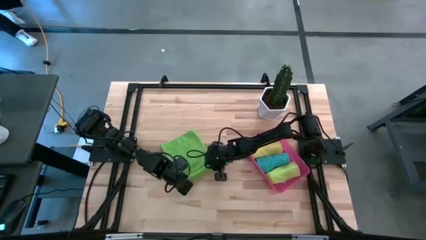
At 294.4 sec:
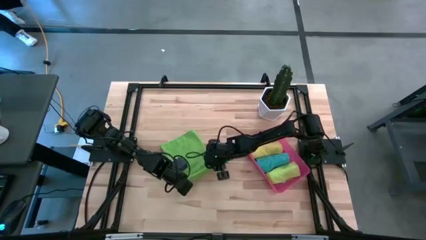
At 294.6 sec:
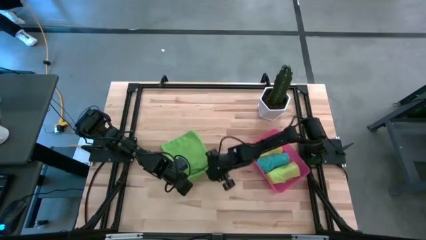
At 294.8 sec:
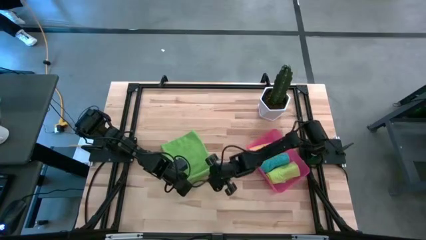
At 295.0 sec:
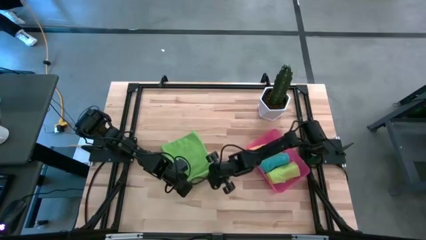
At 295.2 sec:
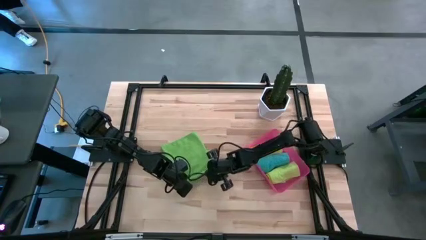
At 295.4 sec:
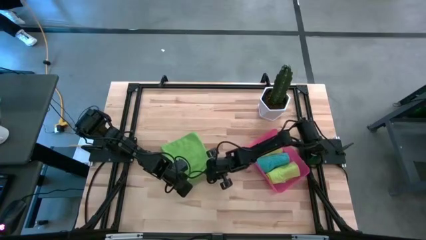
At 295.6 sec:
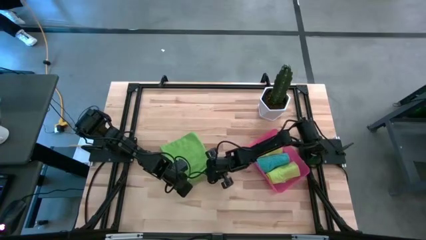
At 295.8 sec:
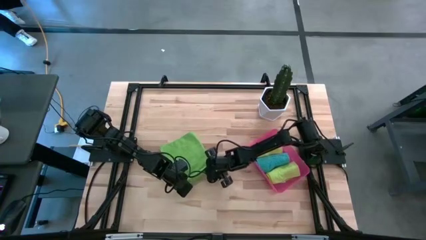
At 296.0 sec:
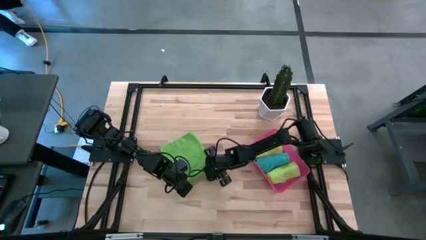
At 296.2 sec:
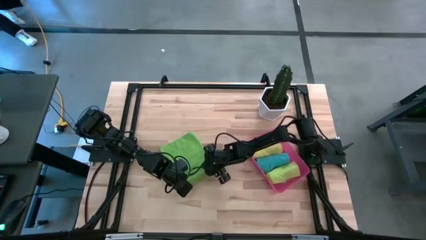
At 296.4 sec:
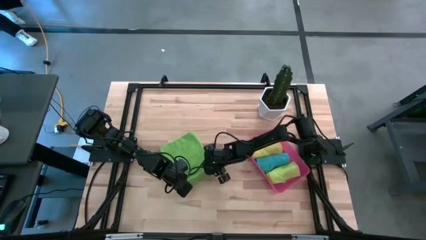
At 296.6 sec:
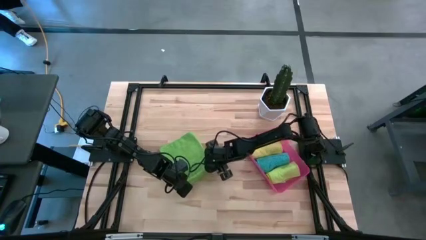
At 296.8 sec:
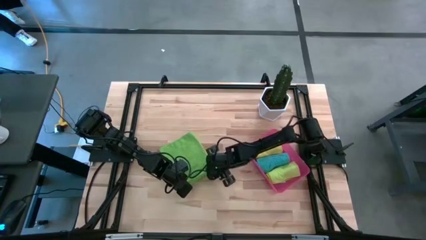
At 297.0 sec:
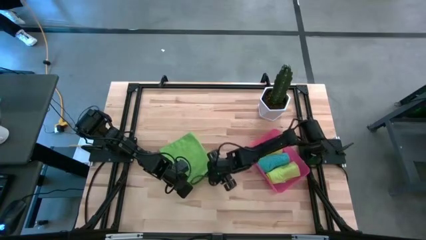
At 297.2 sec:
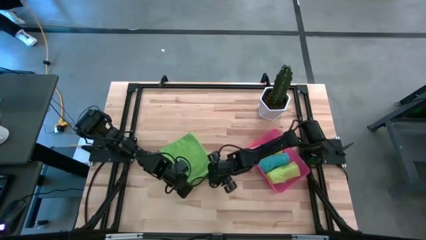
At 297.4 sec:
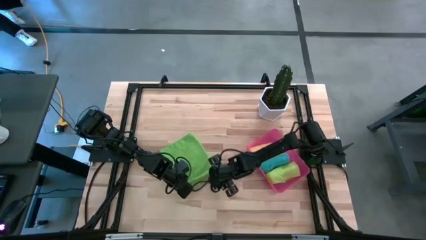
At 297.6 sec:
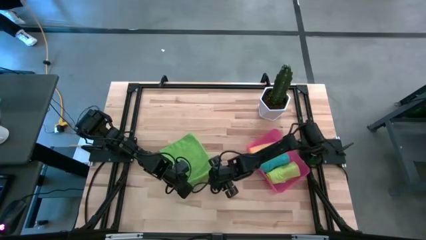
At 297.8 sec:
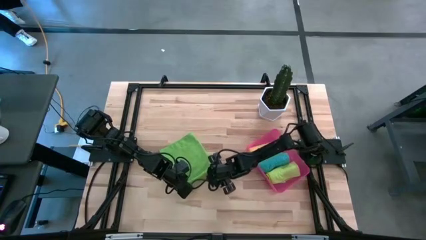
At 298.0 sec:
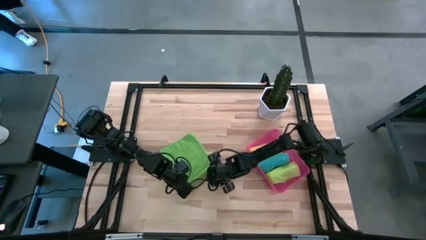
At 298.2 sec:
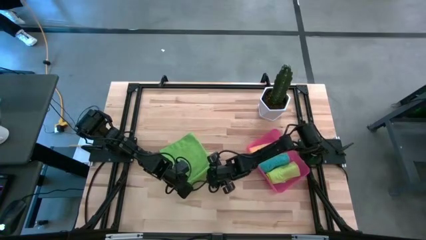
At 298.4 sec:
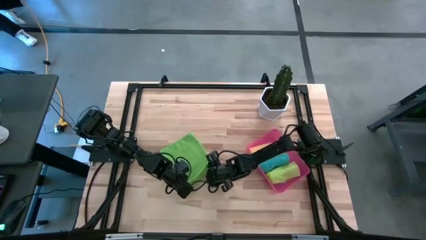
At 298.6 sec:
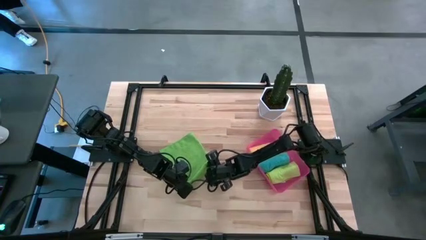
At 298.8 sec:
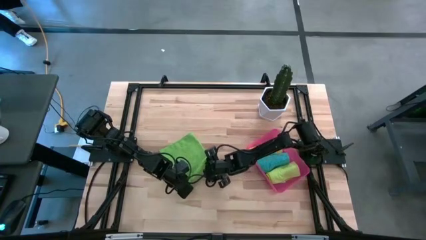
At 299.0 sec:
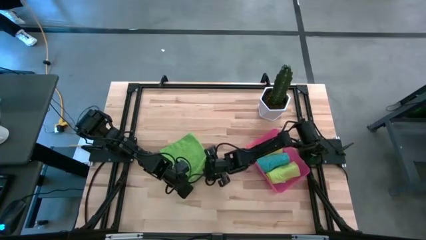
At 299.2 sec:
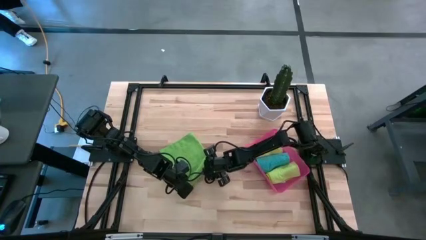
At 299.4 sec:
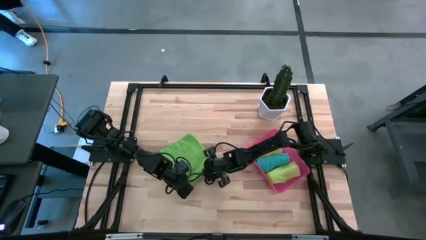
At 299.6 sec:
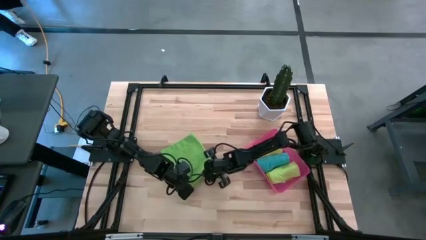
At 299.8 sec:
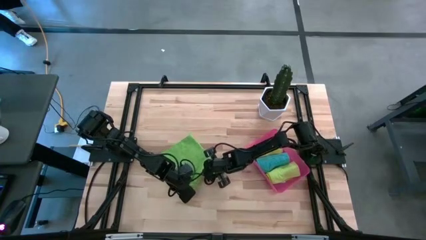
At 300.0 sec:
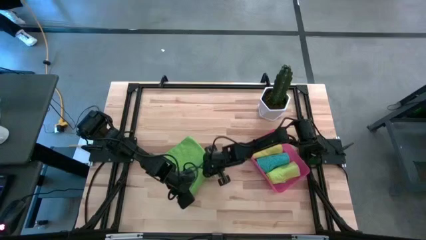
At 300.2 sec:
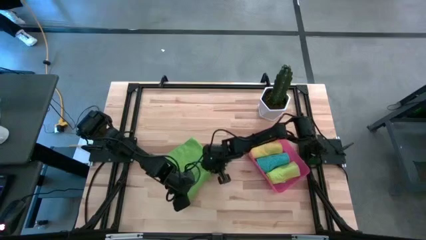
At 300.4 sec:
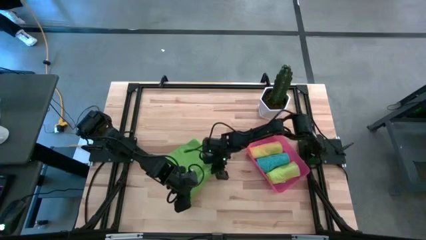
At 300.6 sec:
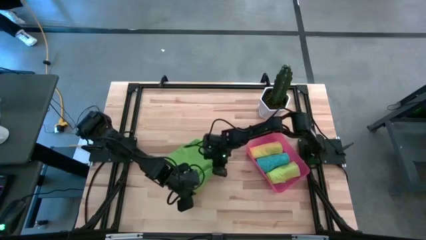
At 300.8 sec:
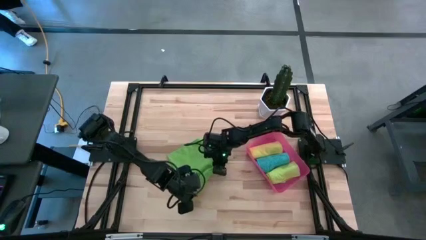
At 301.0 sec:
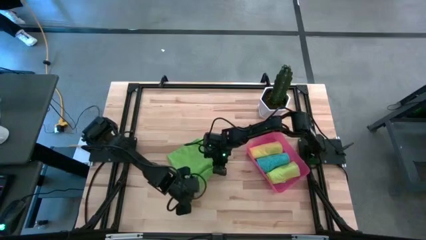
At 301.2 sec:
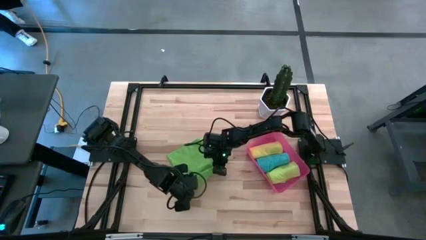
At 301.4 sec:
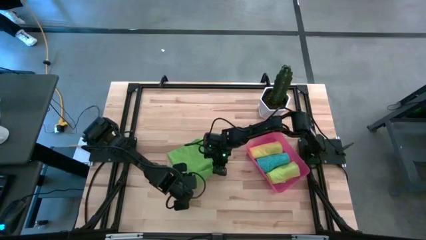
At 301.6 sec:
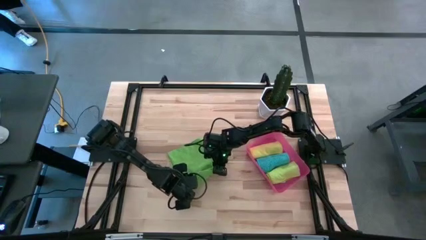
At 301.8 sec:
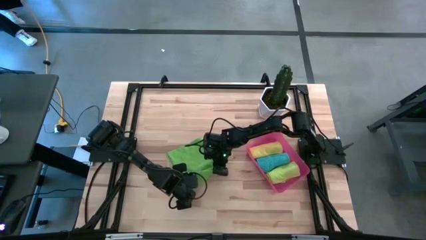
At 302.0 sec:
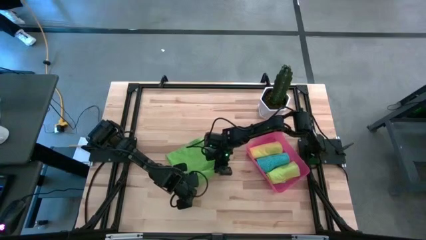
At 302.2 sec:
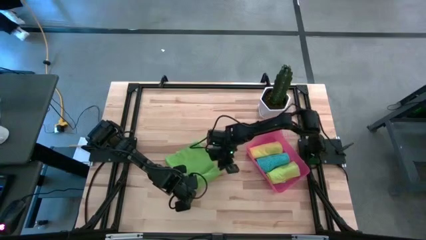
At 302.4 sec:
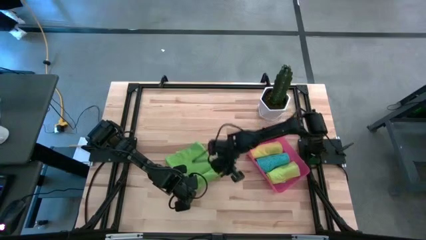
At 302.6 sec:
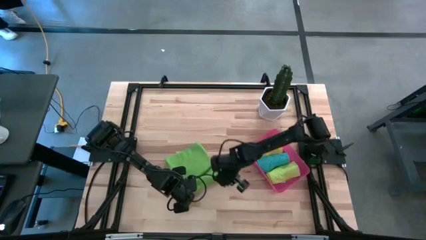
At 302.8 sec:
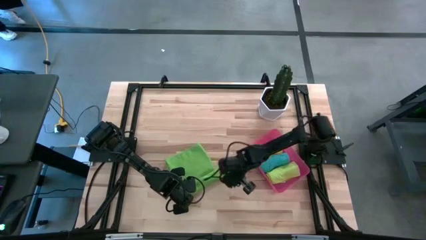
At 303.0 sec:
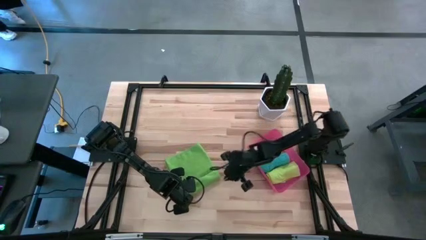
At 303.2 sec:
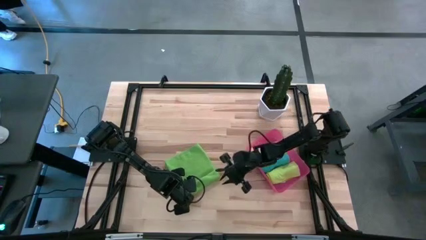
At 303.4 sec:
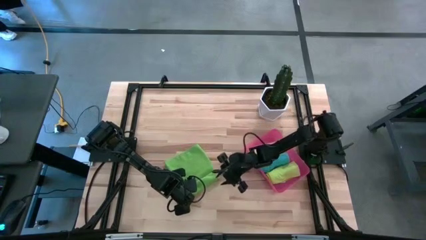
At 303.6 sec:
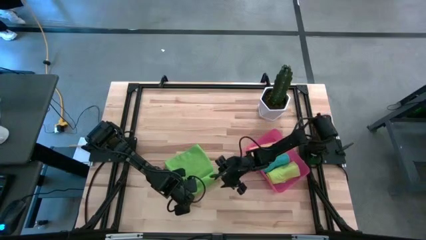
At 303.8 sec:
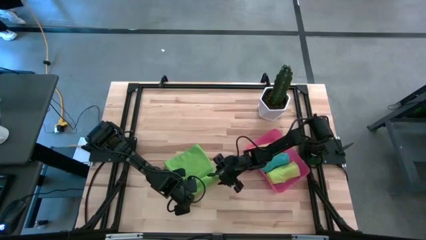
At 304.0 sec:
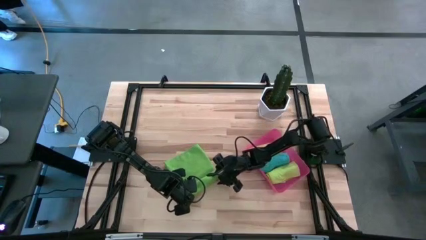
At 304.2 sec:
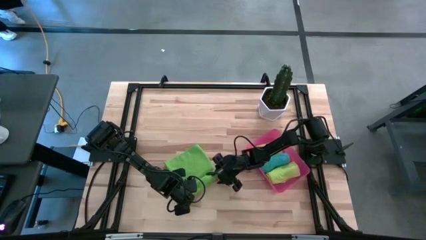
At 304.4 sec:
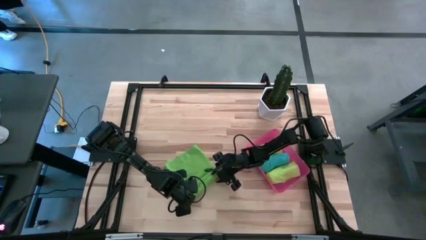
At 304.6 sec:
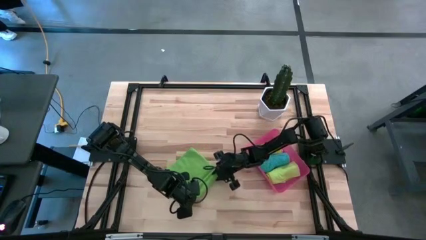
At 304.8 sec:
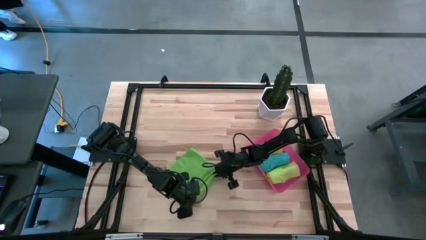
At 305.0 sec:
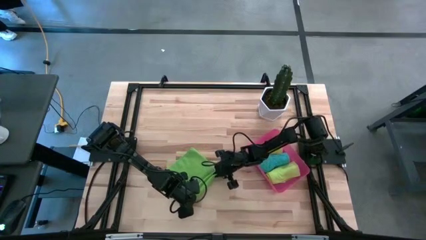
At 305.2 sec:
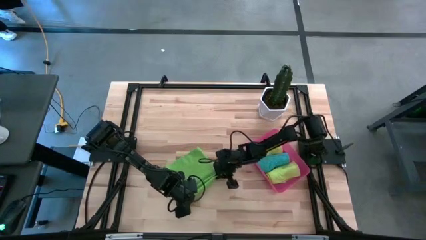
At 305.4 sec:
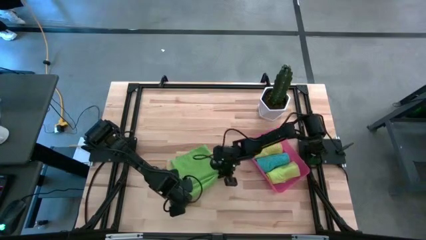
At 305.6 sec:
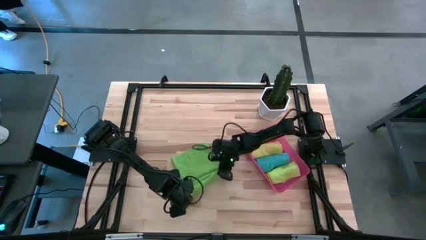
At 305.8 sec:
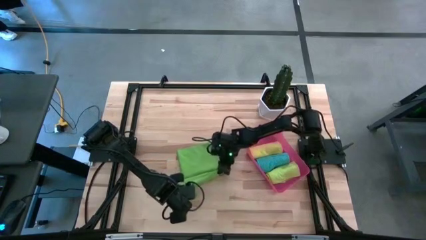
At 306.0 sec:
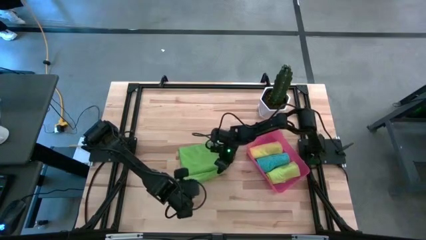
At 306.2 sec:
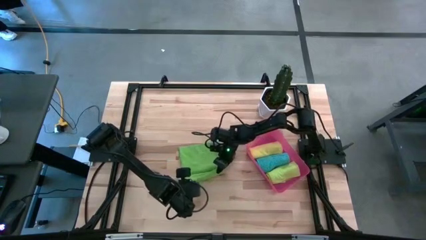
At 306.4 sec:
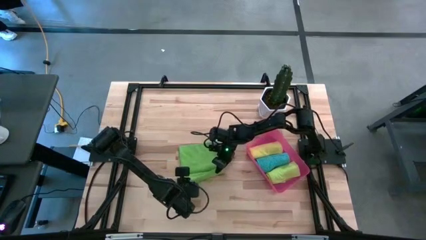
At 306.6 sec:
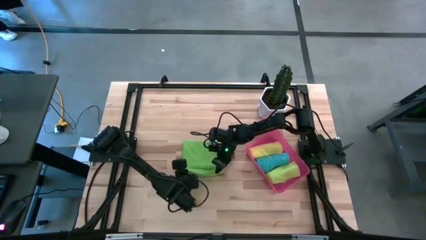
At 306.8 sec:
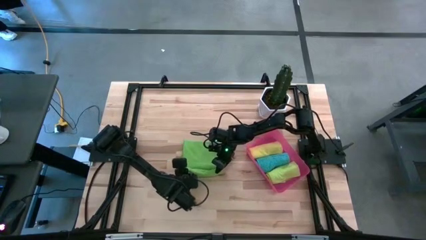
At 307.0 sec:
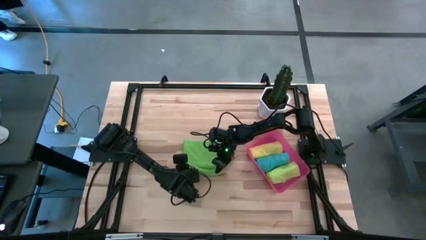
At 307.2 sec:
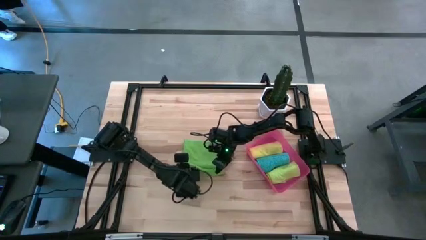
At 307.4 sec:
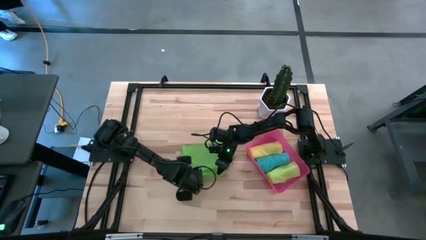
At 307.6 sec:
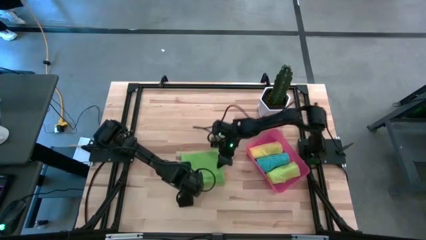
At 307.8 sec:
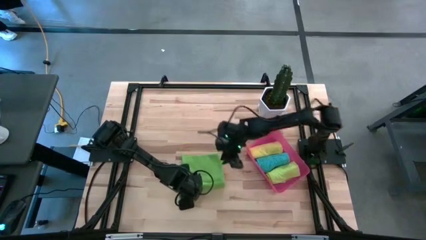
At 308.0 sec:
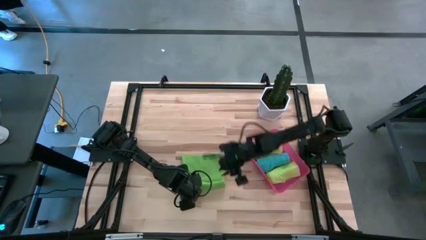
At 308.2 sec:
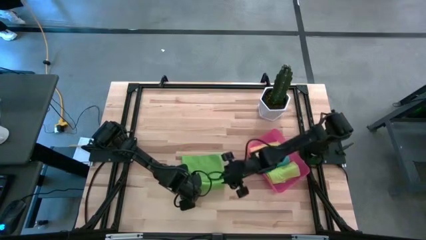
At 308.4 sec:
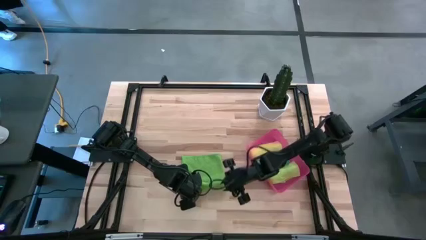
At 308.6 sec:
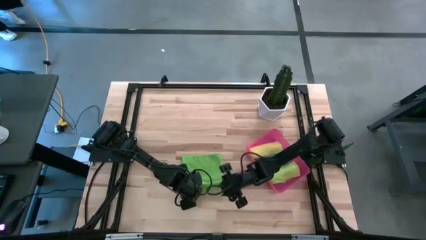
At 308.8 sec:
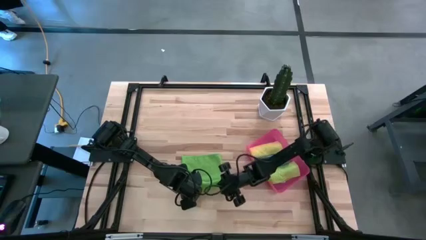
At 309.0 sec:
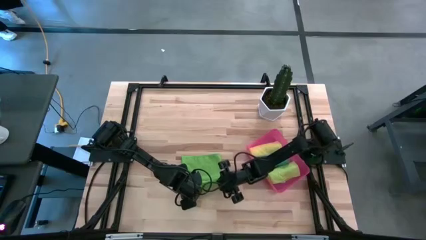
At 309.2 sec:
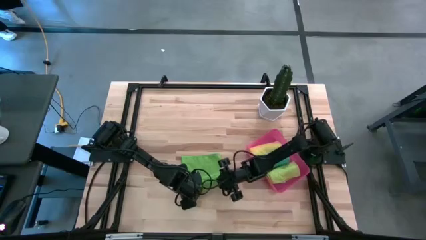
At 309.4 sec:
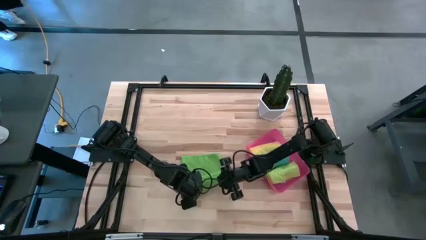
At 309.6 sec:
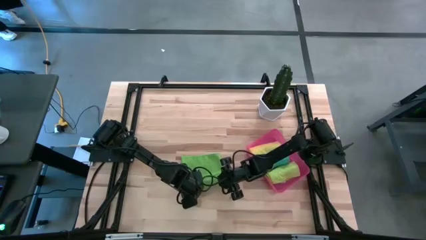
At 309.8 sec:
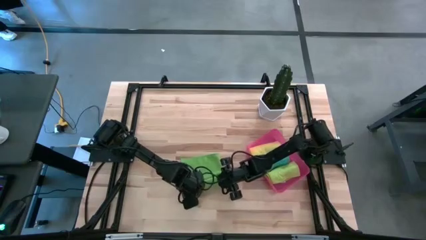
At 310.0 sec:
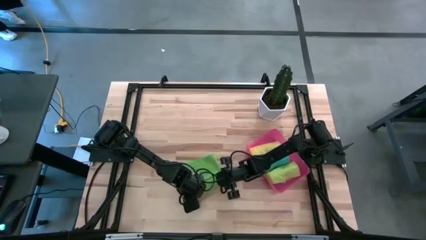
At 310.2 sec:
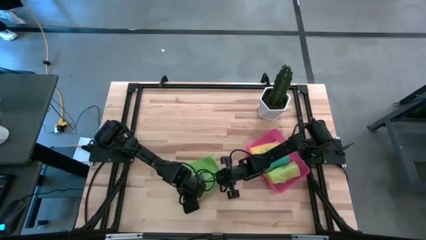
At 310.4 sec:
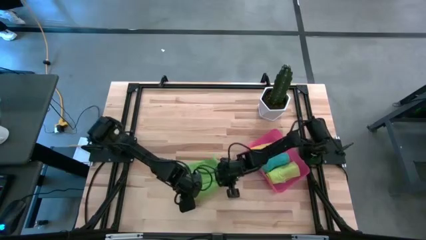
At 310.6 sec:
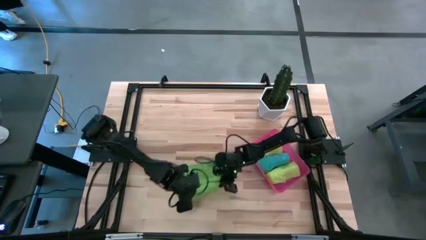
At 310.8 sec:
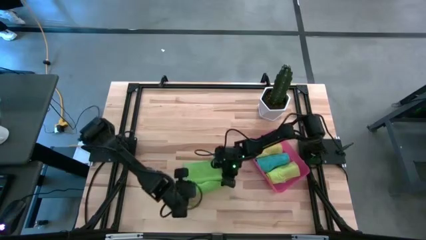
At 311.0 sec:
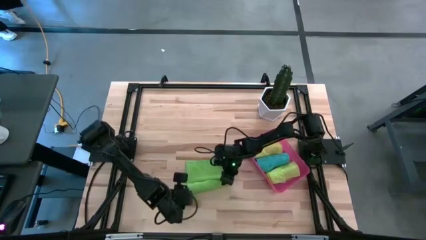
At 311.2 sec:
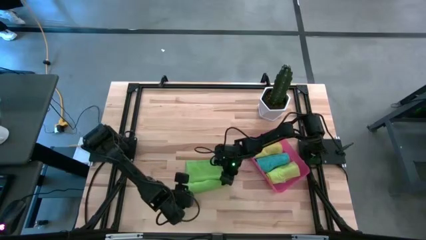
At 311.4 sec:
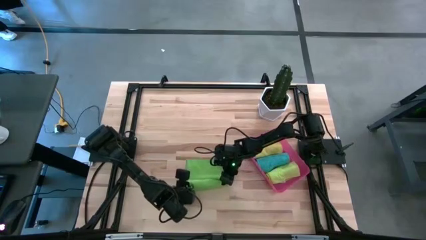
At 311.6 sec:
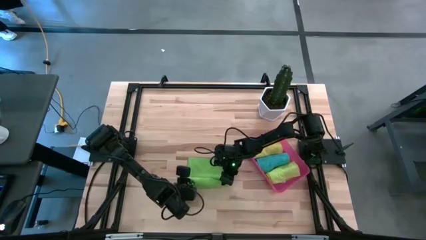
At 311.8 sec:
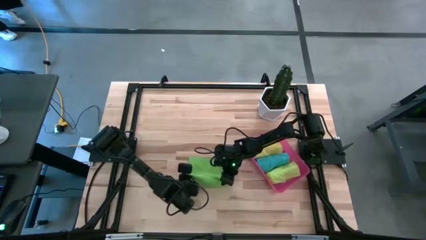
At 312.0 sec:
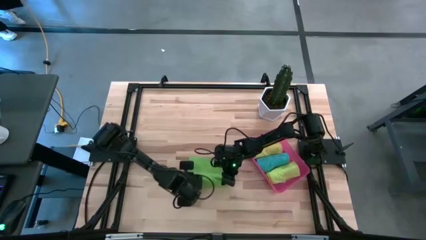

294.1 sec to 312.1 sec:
Task: Roll microfiber towels into tight, uniform cylinder then place into a basket
Roll the green microfiber towel
